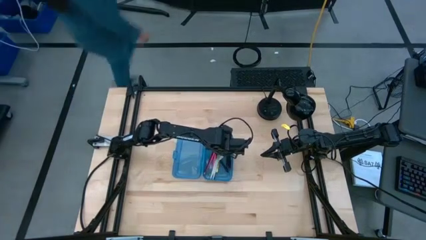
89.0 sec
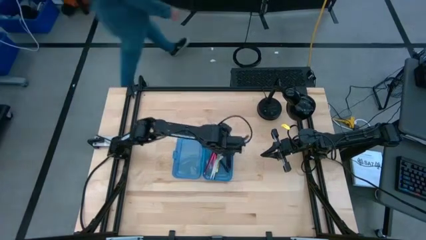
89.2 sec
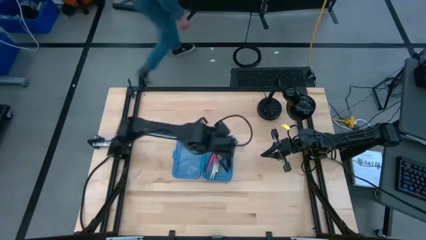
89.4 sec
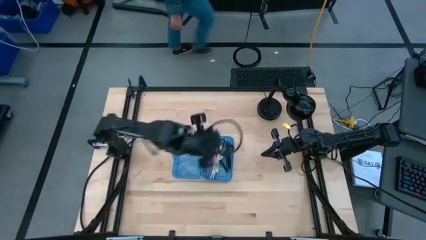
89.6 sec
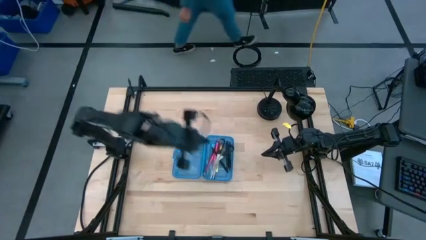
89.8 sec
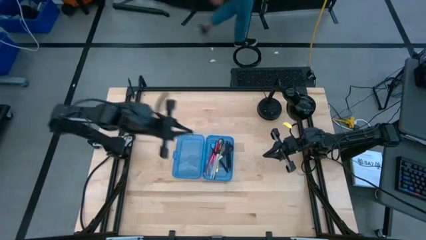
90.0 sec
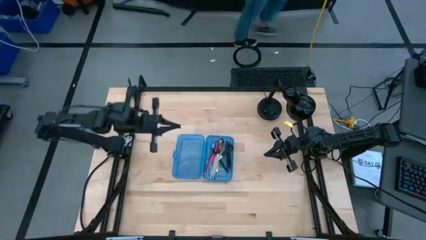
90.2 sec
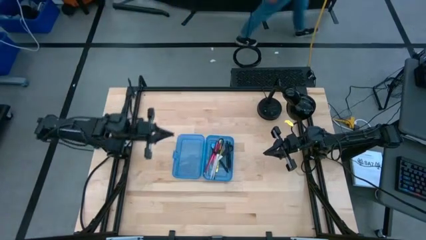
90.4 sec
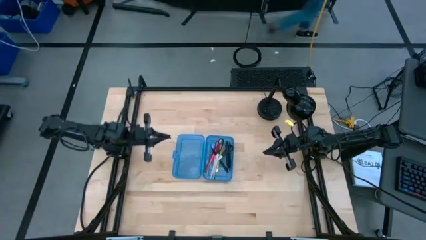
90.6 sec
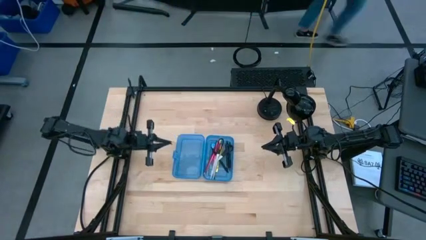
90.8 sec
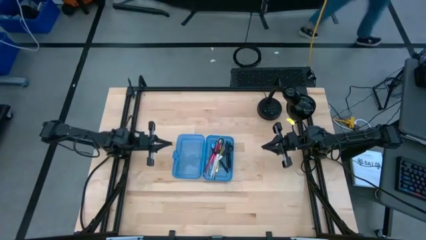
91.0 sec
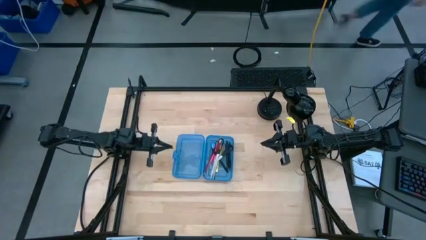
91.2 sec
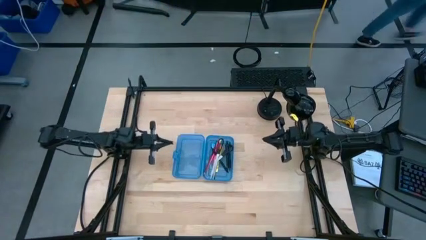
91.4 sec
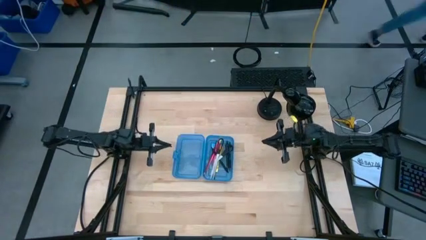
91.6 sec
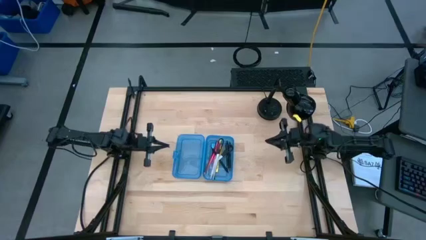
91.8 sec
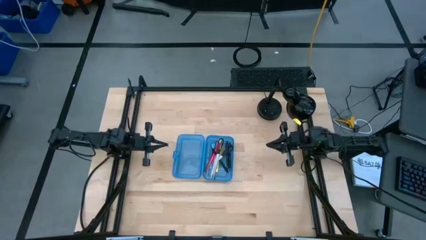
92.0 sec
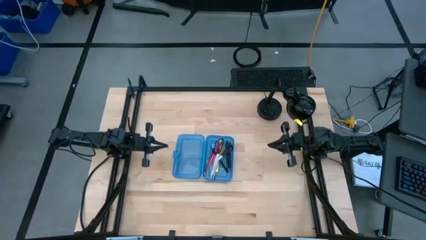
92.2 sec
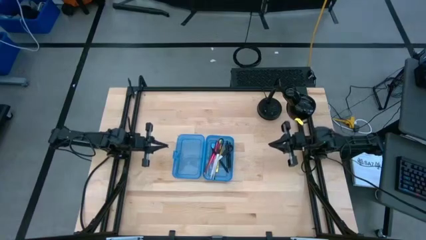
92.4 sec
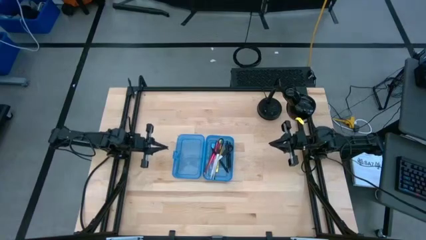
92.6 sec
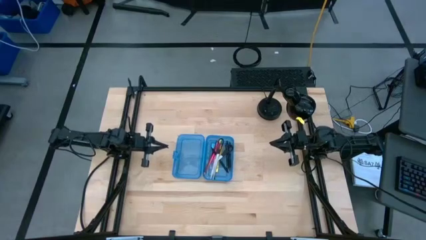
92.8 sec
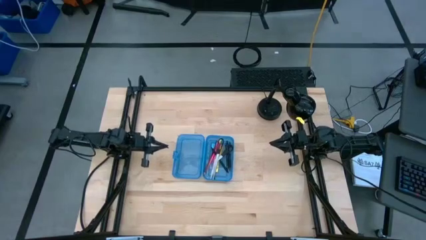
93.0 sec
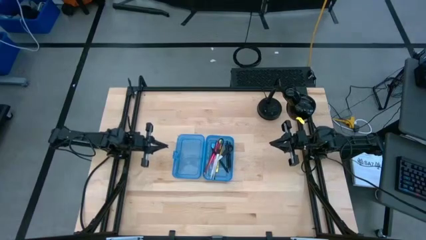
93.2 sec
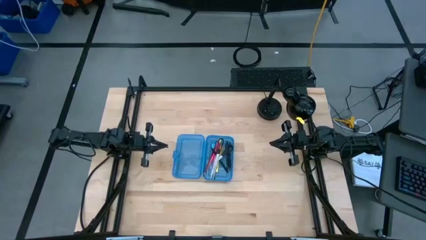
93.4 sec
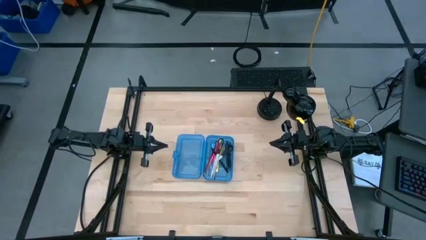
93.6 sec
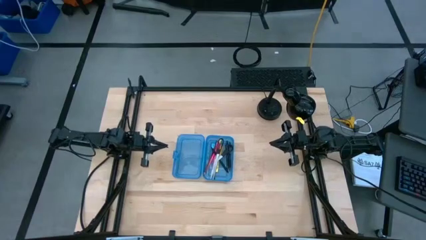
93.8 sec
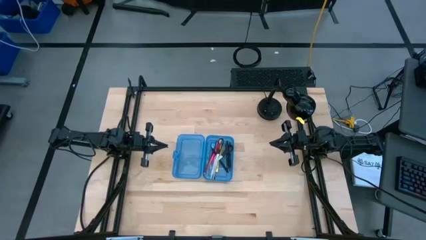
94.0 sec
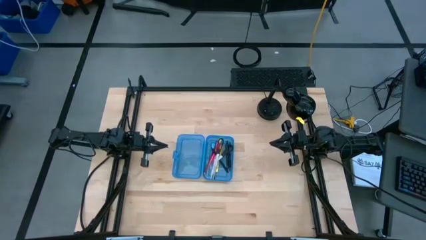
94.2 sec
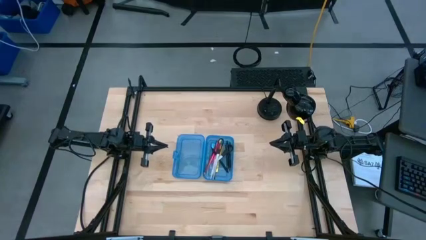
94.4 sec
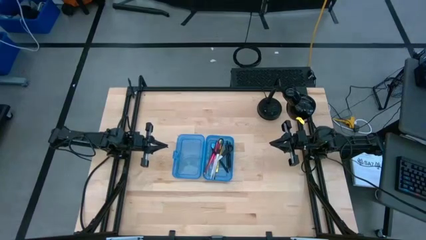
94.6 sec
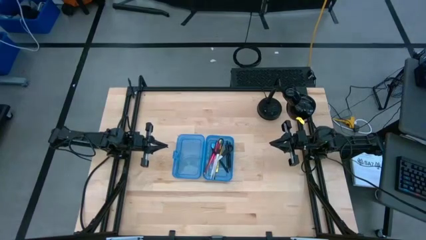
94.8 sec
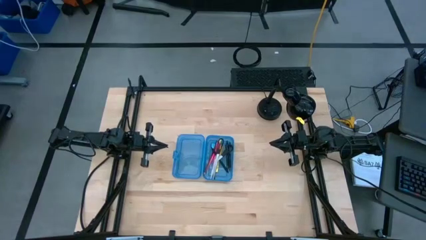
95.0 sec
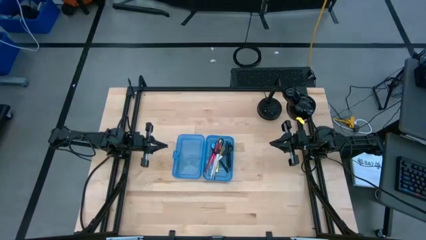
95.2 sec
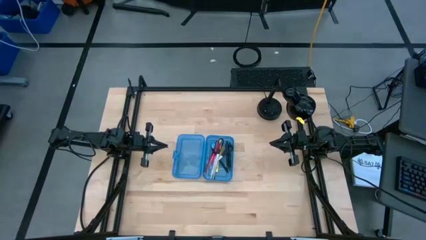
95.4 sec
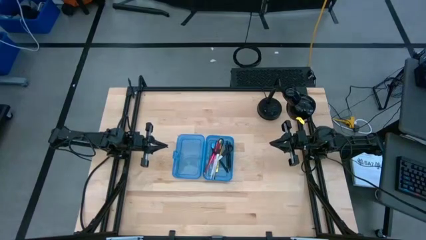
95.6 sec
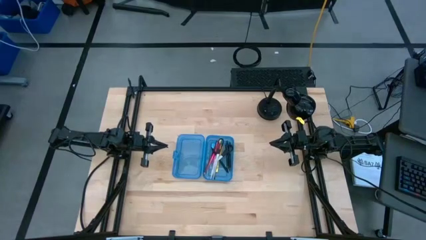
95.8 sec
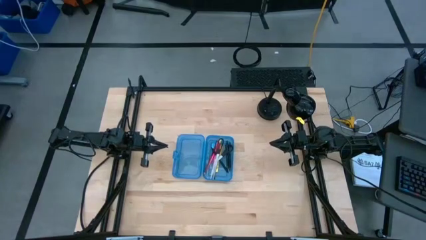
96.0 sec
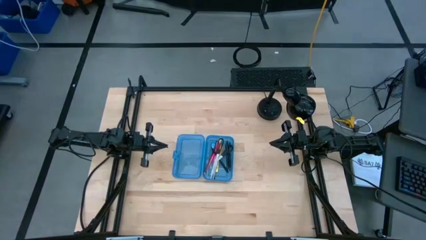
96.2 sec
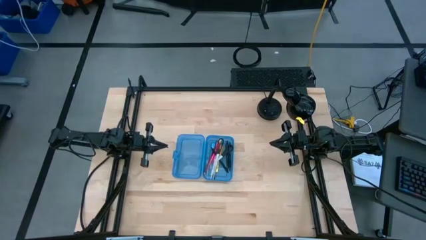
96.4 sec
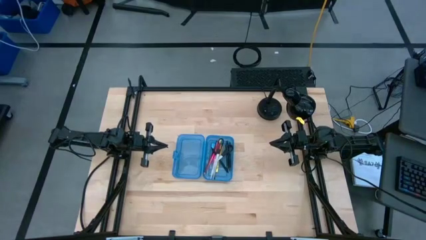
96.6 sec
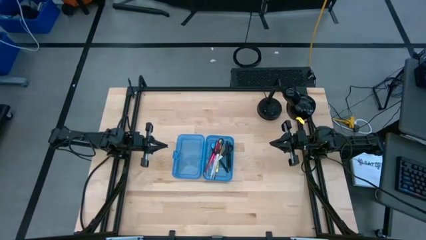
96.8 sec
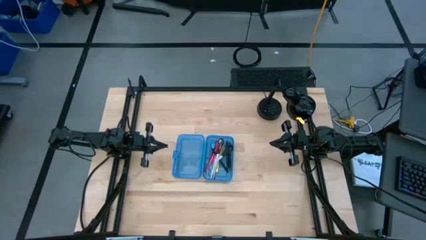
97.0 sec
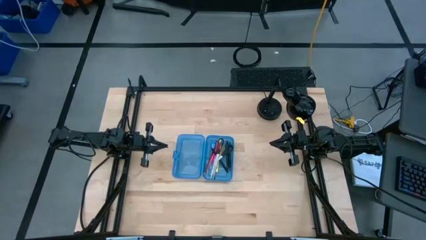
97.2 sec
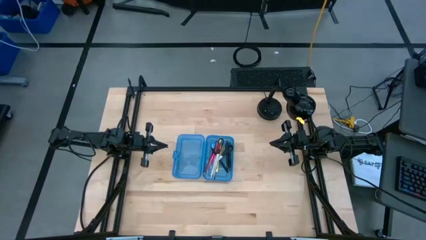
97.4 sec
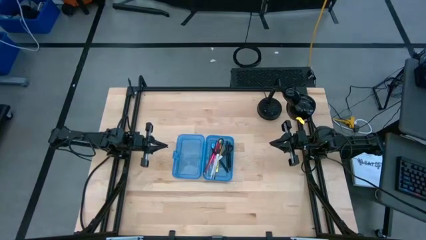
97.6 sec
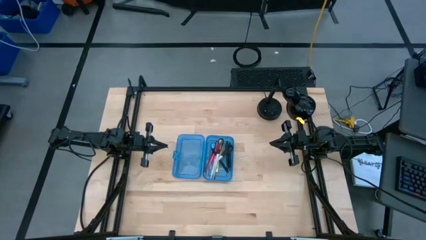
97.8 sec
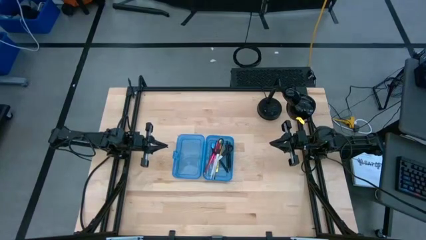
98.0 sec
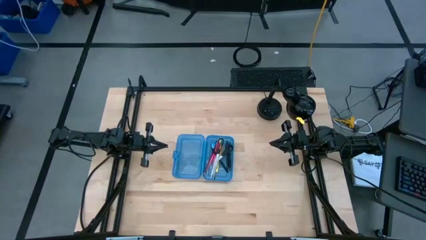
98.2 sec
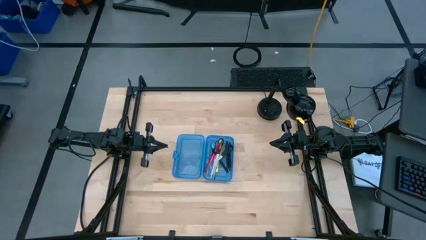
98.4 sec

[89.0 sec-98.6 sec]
Task: Pick & place school supplies into a supply box
Return to Home Position

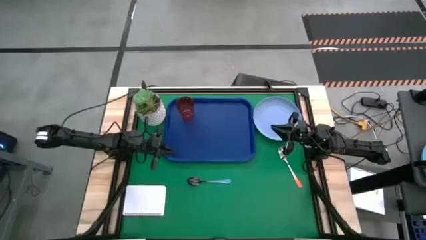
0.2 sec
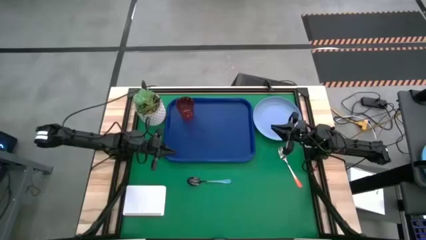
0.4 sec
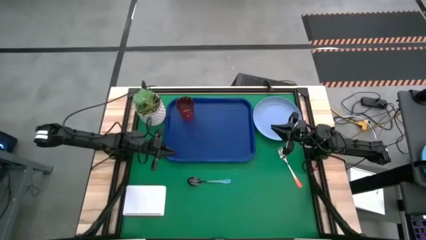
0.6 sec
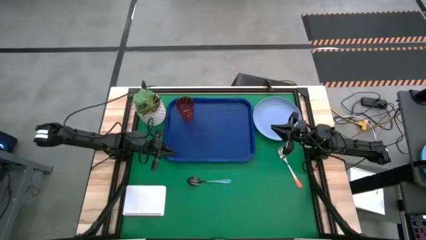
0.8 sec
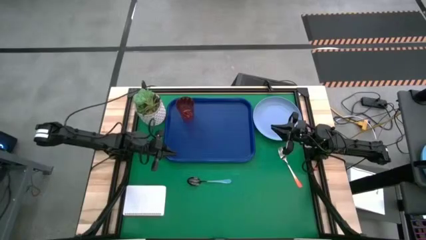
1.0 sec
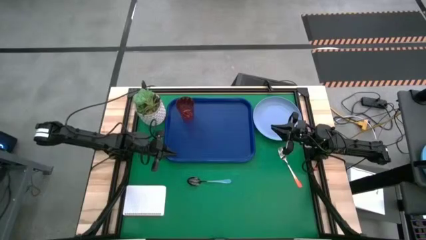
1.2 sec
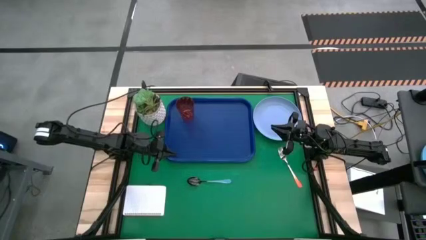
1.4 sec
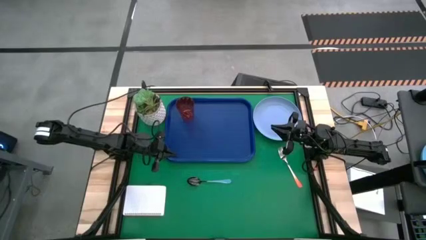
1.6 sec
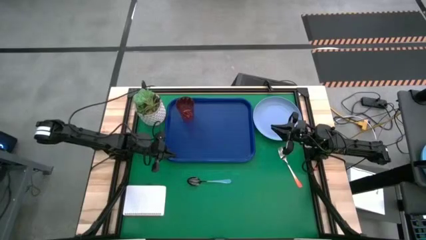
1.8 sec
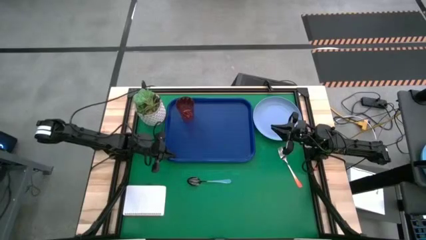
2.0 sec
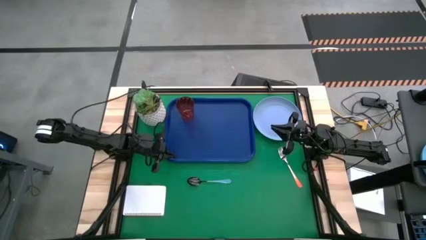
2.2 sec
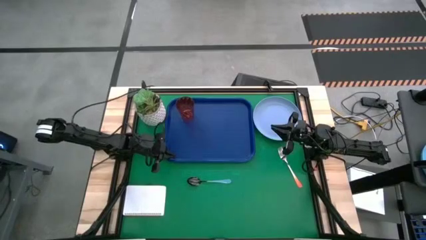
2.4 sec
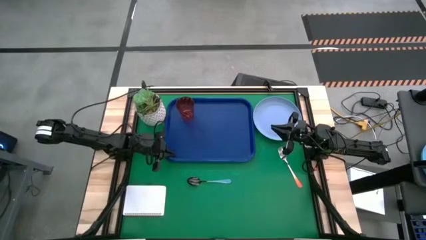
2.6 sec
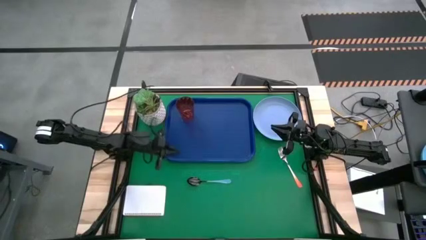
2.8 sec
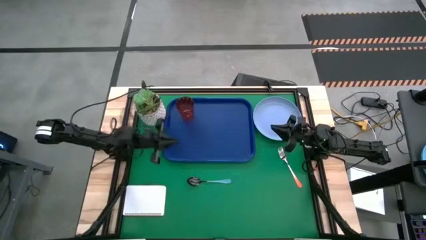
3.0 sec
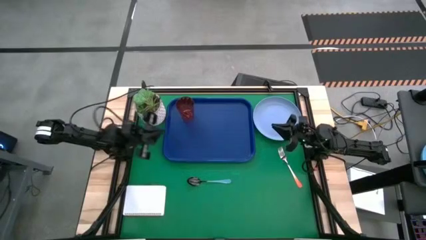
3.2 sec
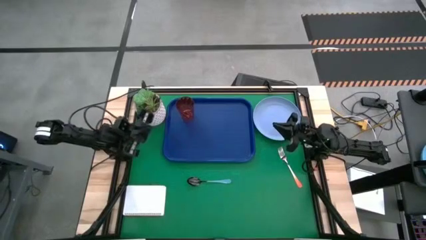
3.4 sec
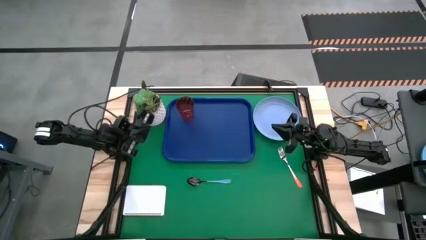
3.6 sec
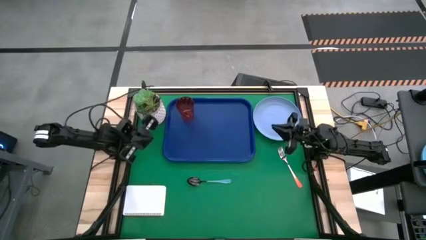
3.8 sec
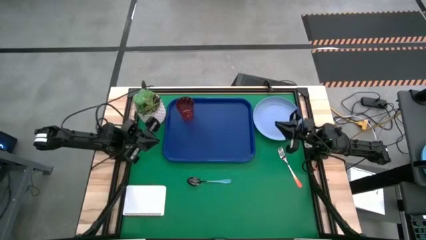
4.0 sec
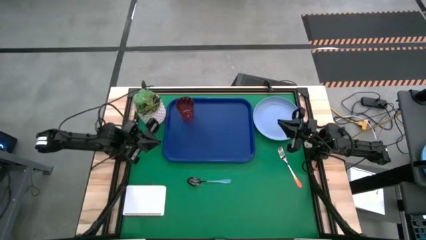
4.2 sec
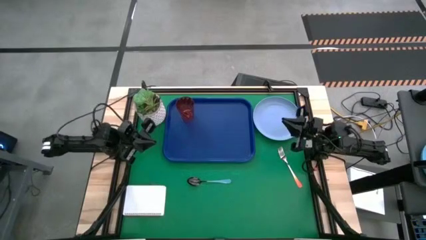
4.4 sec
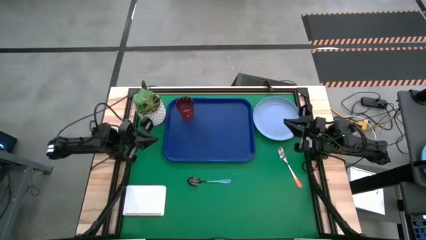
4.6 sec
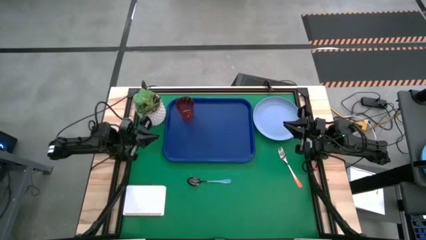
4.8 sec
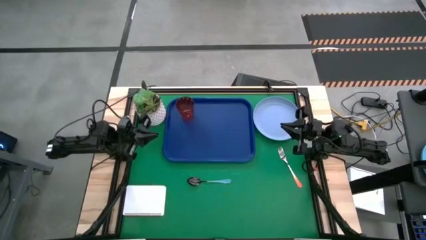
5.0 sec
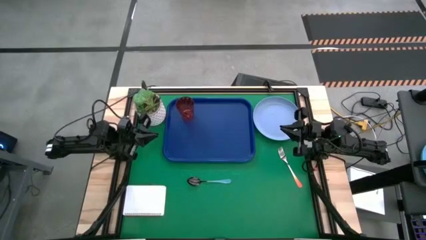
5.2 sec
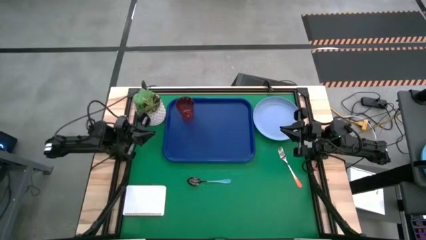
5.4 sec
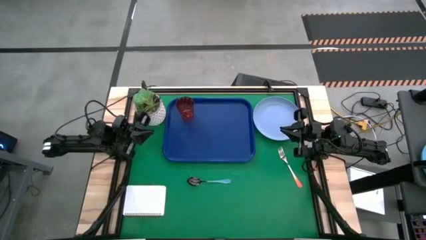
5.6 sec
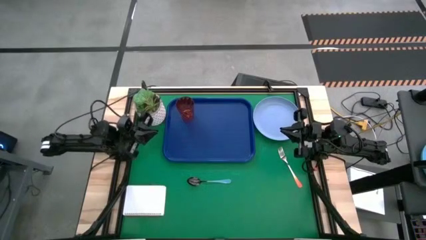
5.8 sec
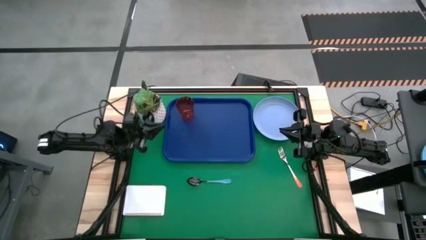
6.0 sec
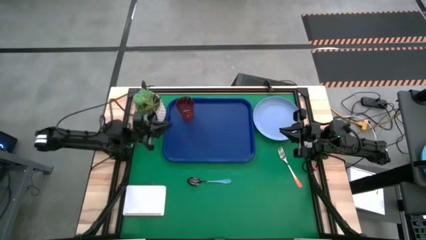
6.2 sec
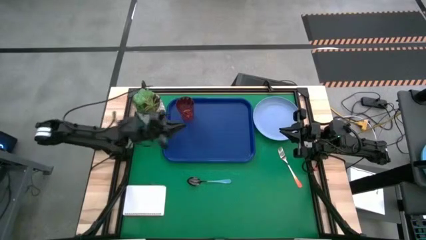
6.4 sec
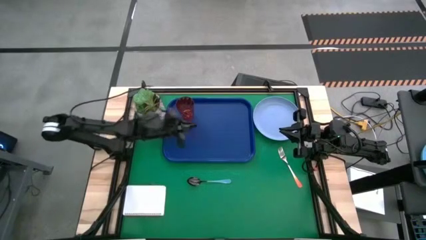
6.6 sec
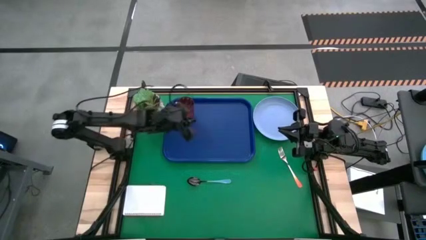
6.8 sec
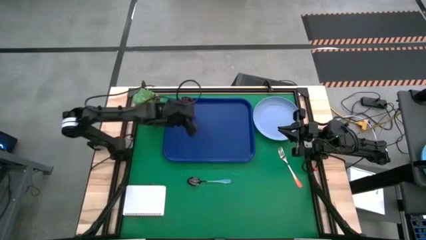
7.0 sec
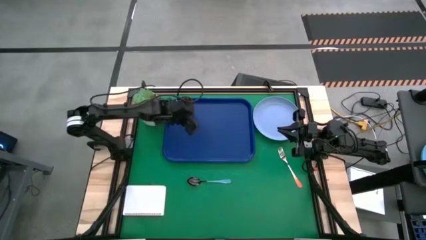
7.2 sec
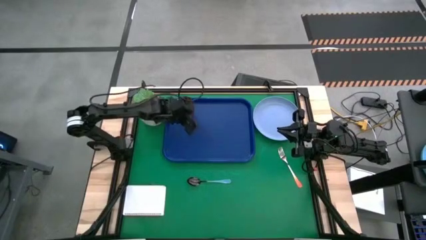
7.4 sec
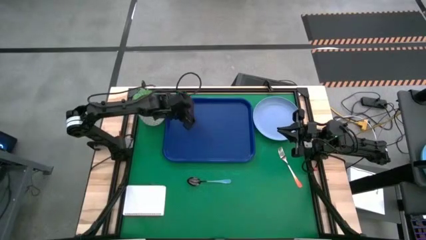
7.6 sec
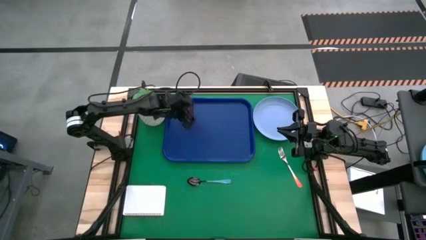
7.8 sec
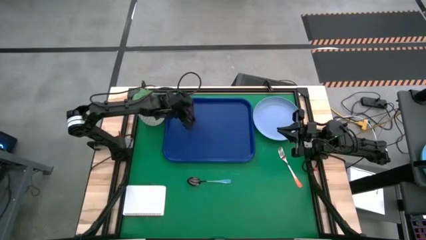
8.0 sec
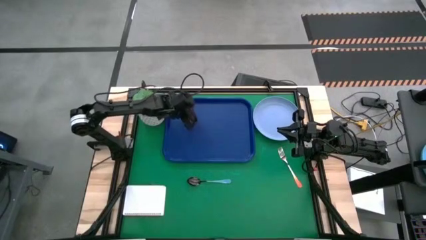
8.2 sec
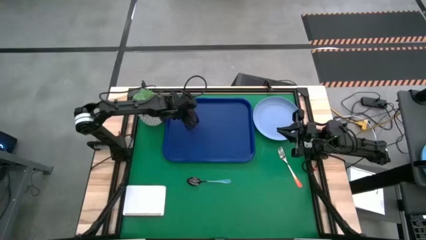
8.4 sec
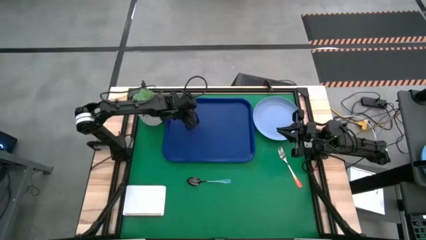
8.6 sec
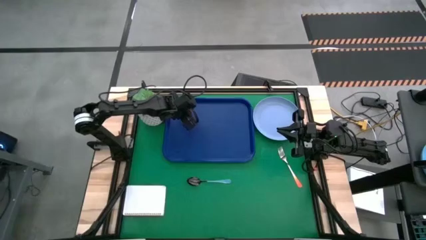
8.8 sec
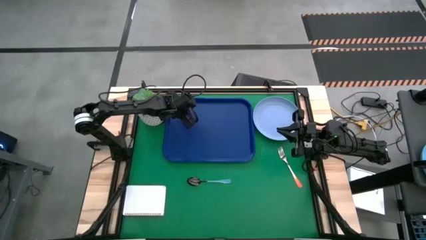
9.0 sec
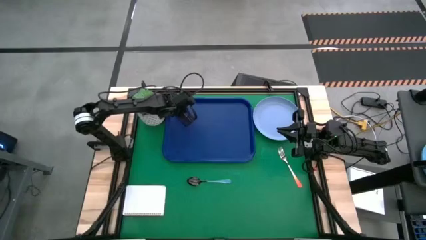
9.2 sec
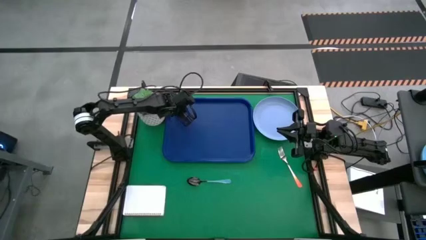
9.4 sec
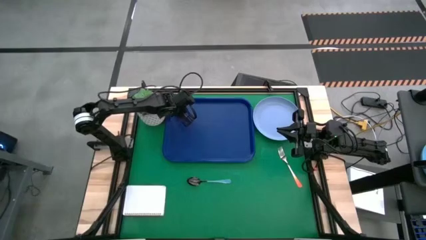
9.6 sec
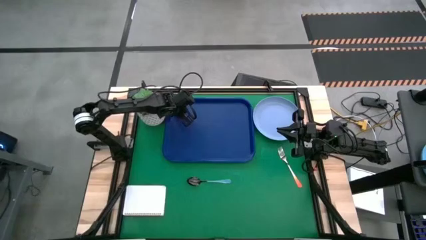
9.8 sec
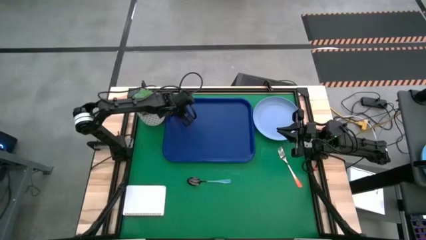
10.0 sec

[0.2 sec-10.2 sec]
Task: Pick and place plate/cup/fork/spoon on tray
Adjust the red cup on the blue tray
